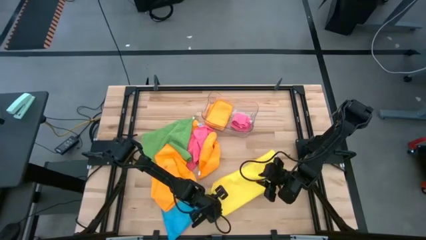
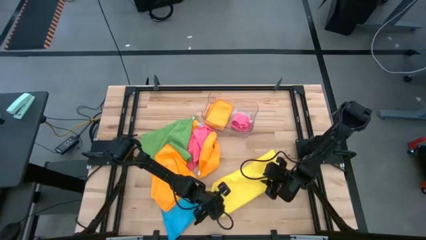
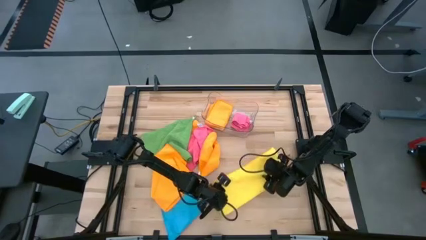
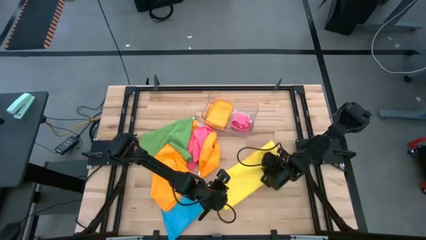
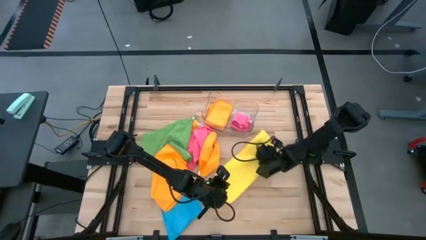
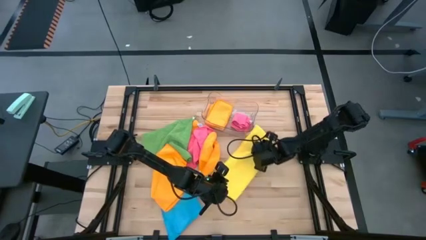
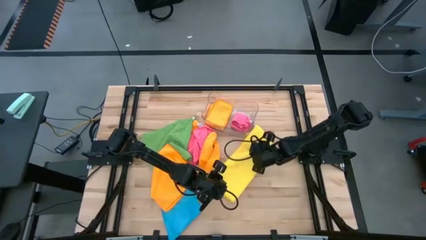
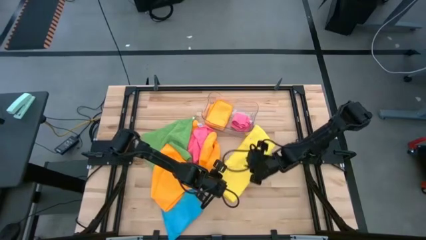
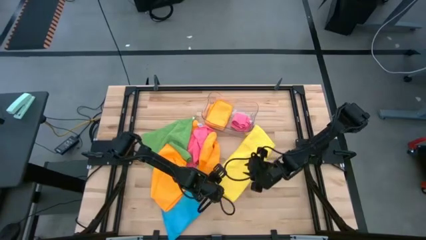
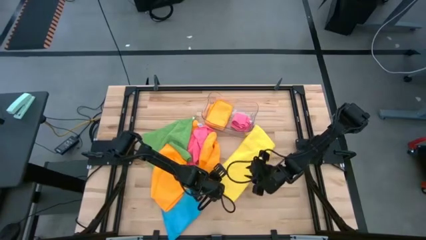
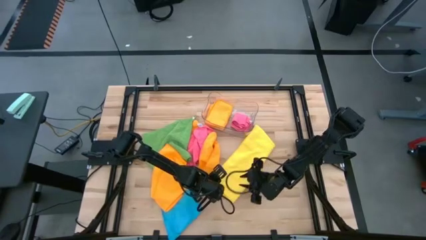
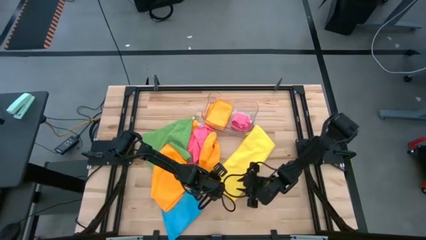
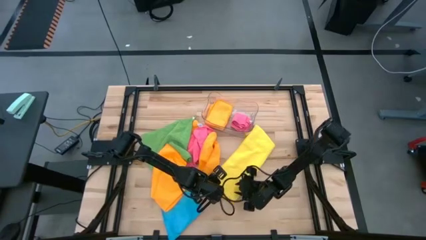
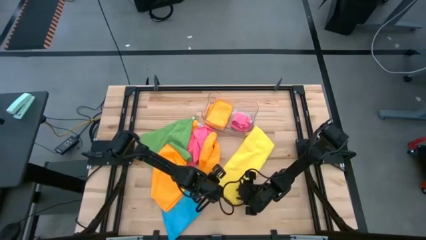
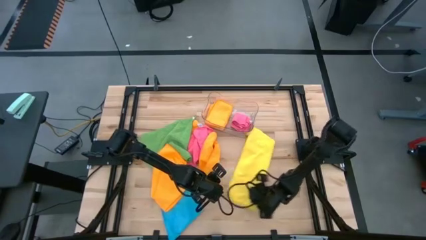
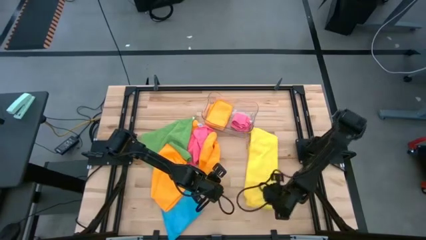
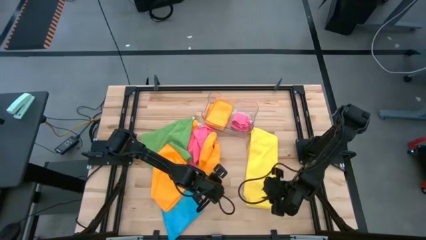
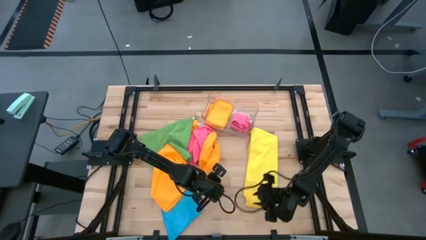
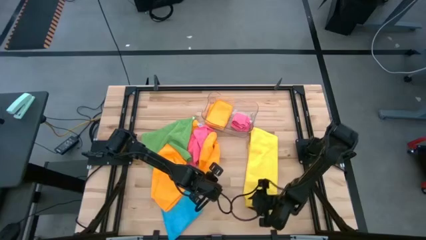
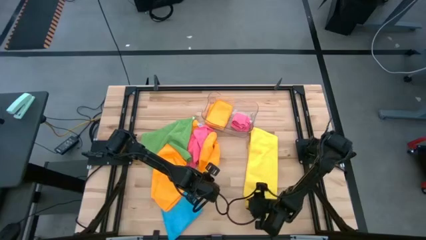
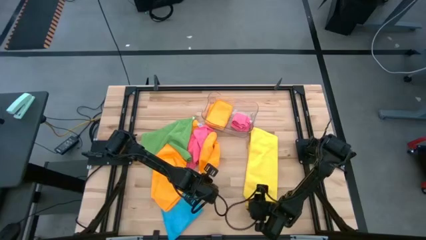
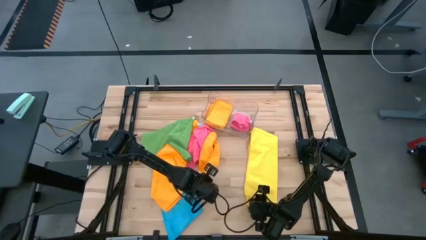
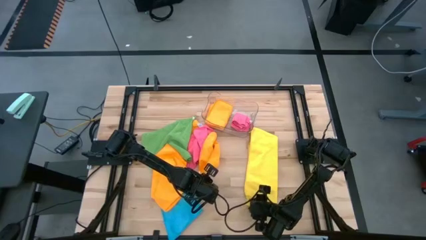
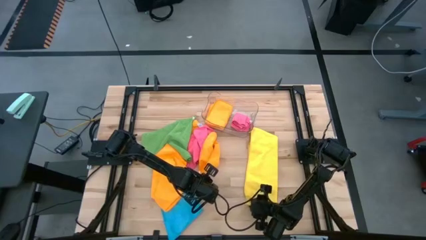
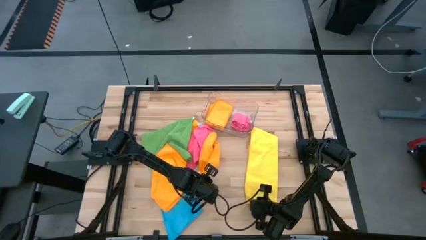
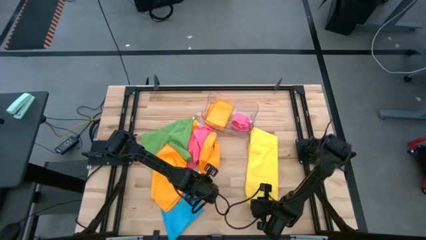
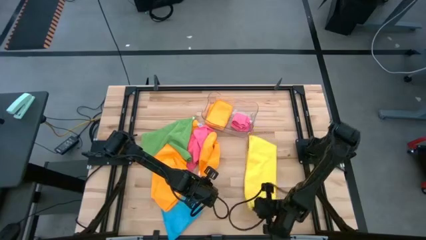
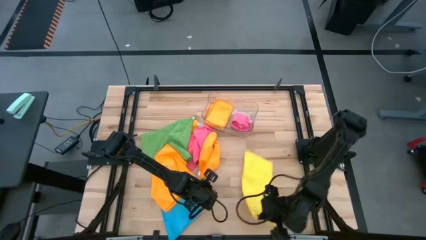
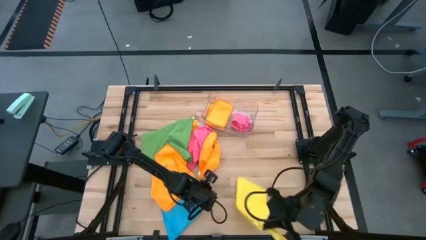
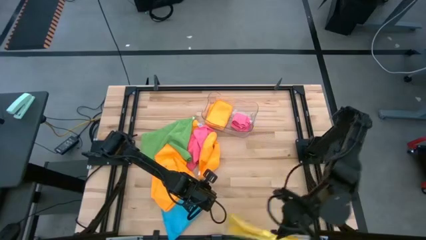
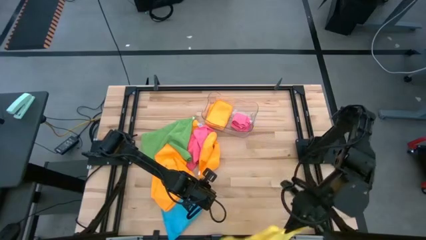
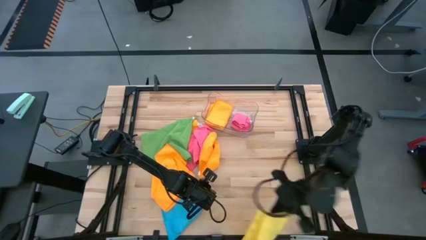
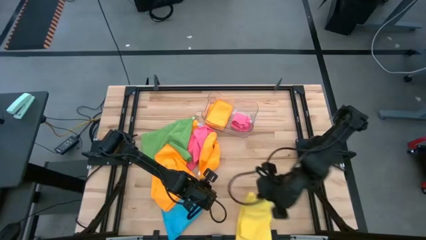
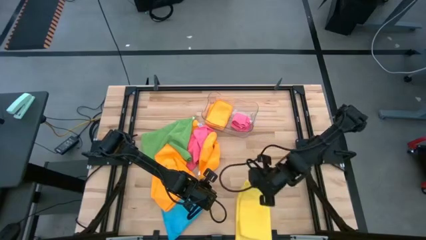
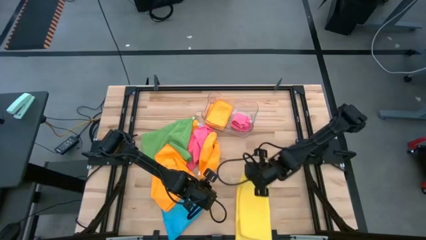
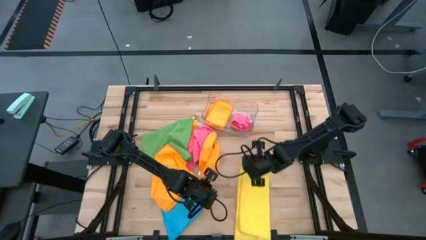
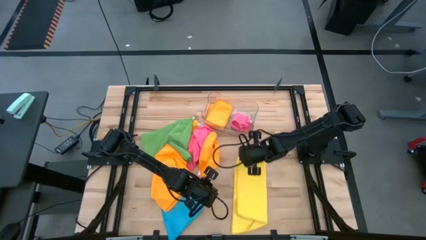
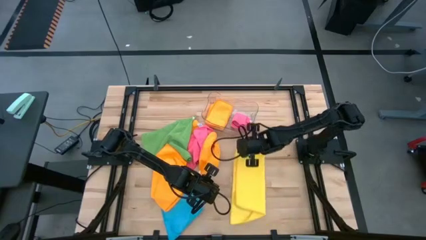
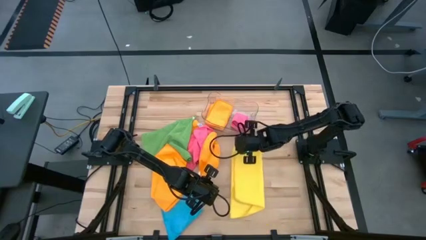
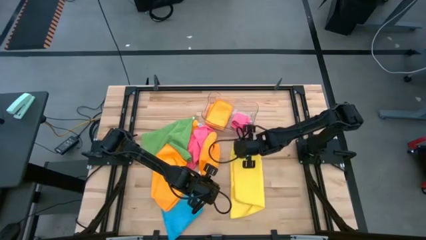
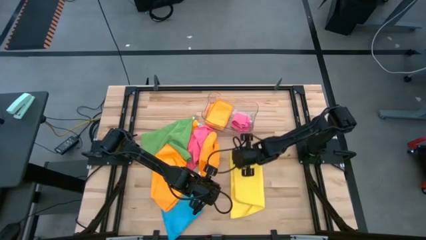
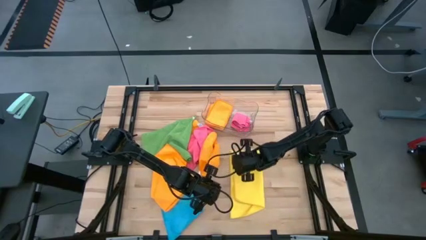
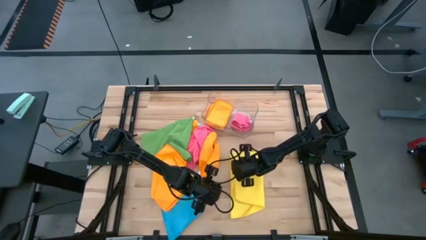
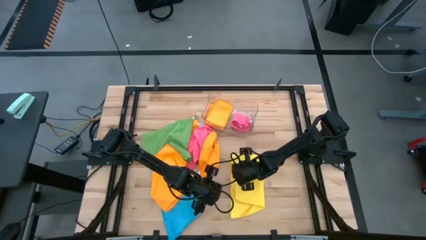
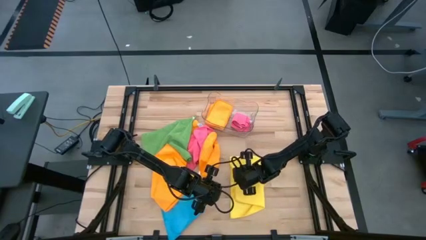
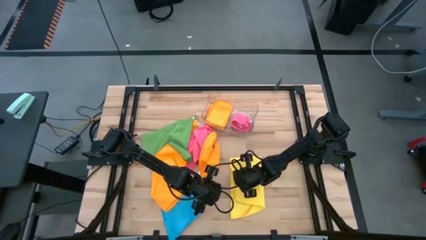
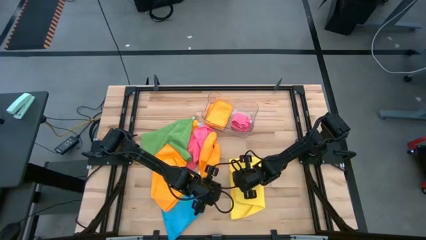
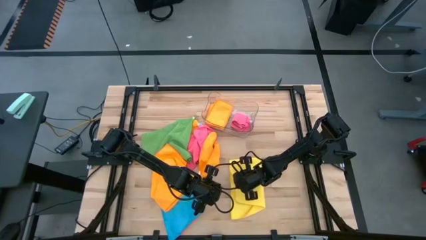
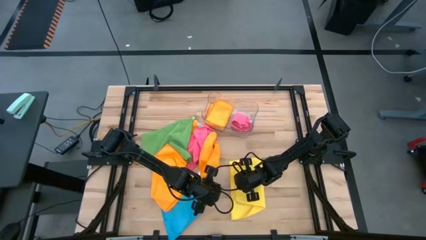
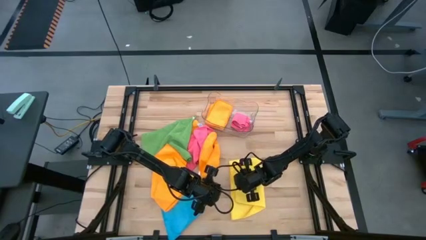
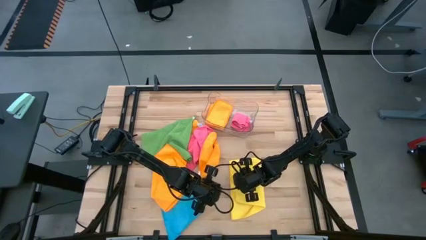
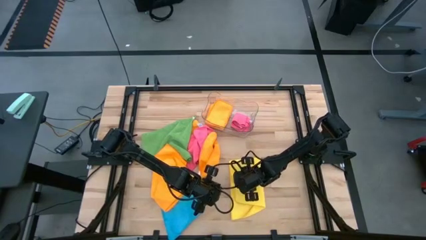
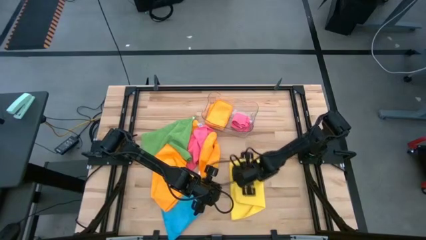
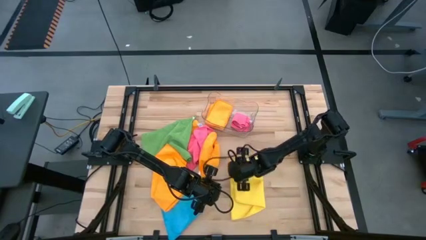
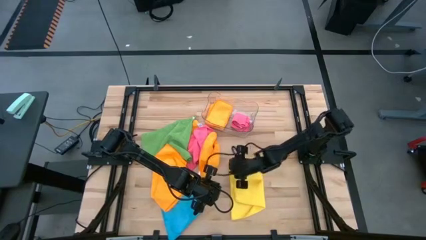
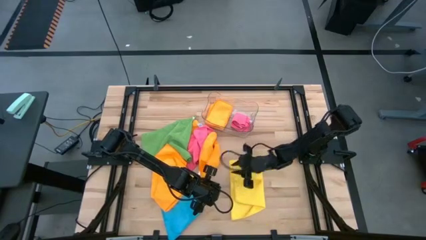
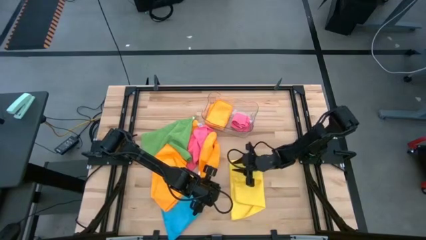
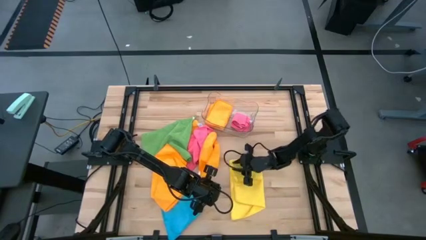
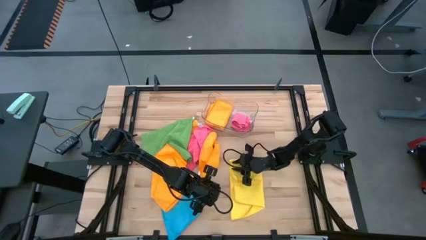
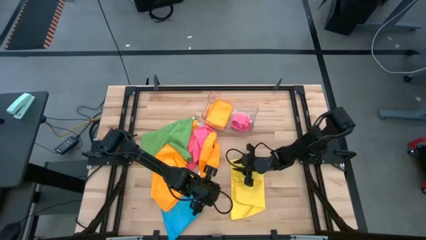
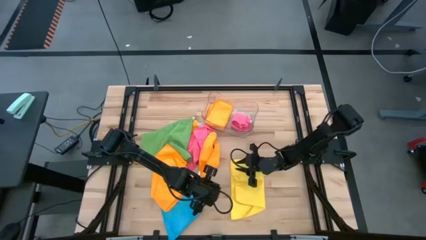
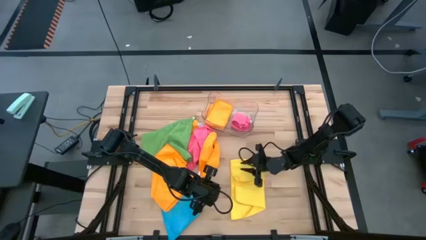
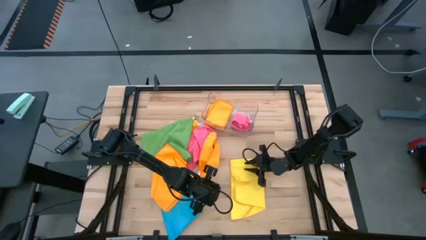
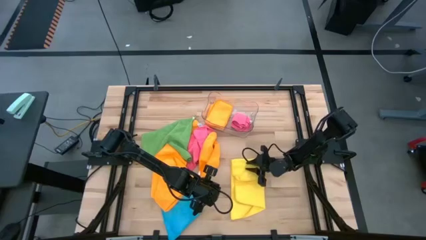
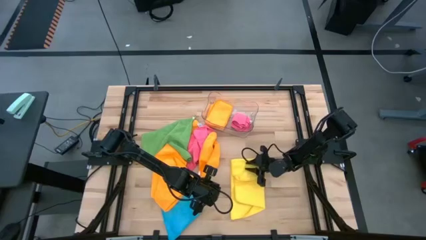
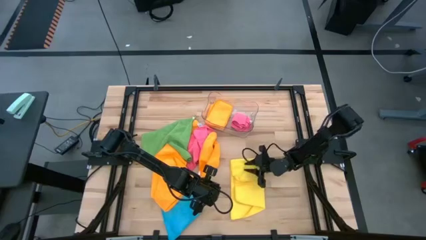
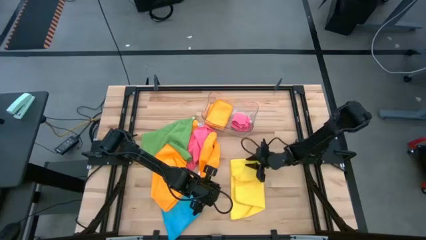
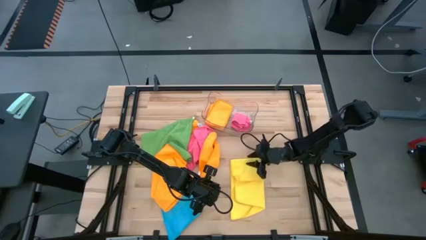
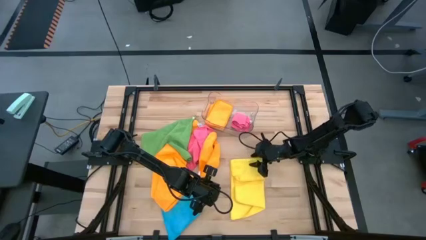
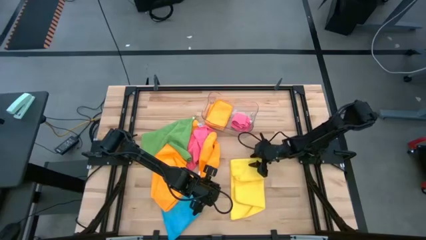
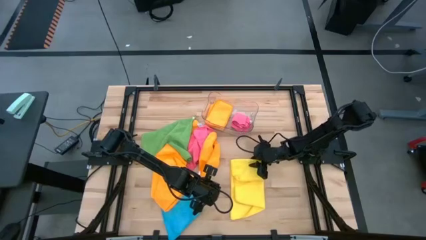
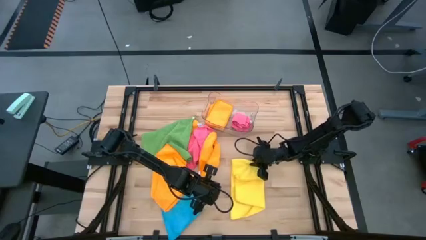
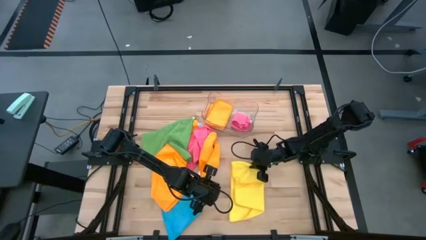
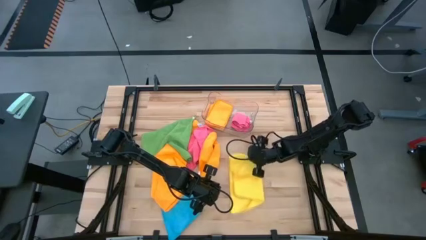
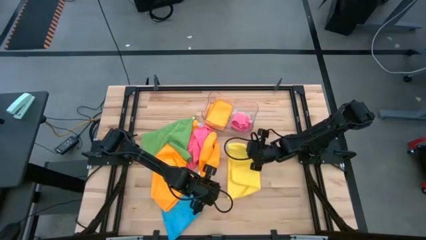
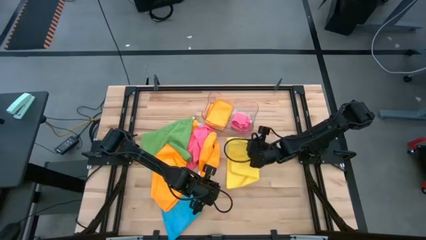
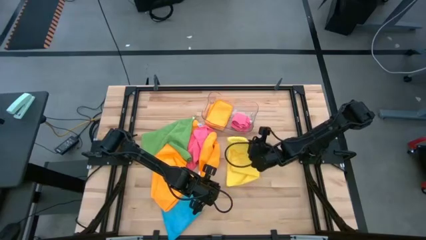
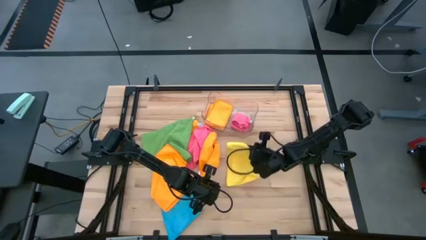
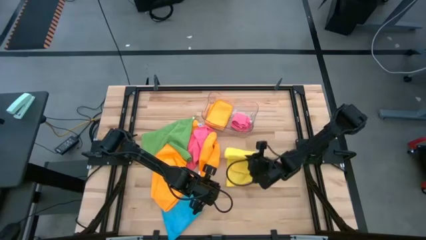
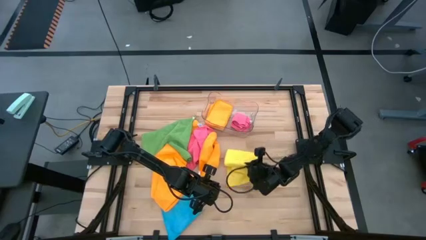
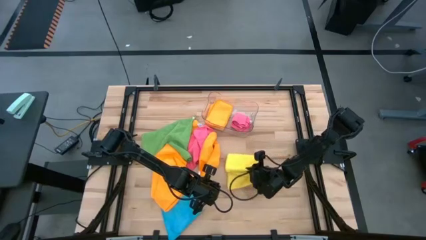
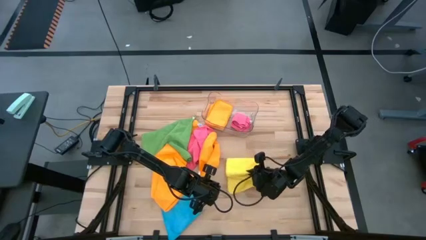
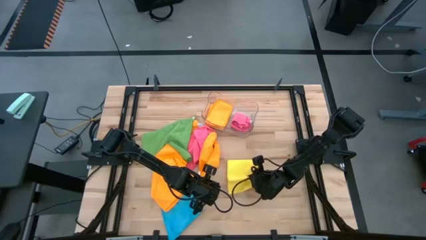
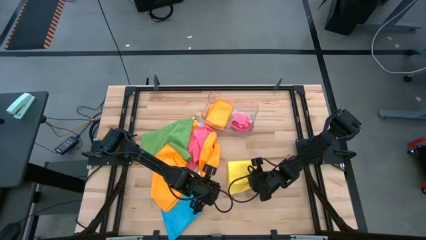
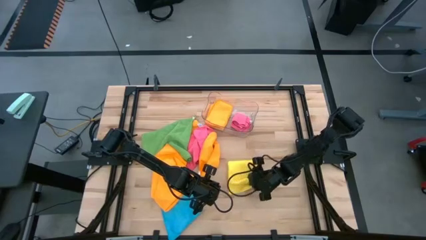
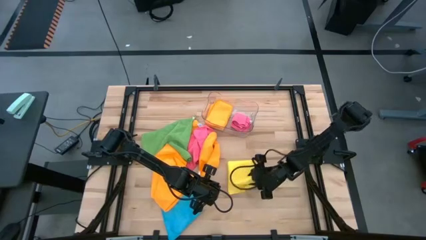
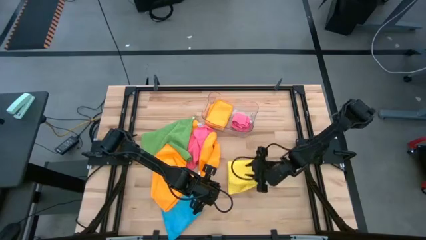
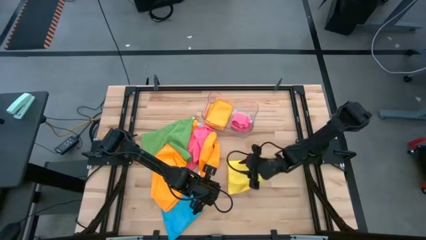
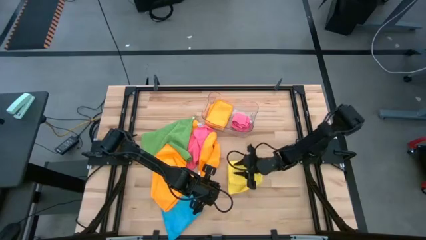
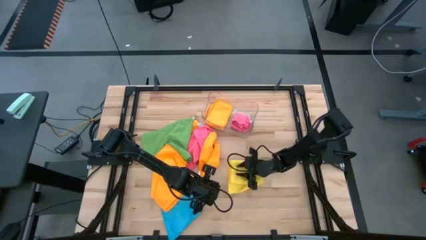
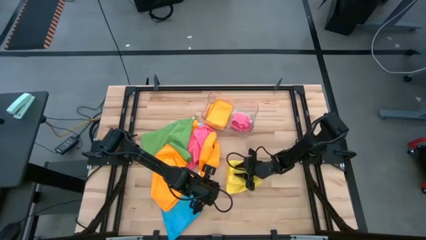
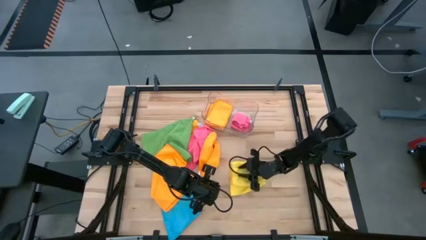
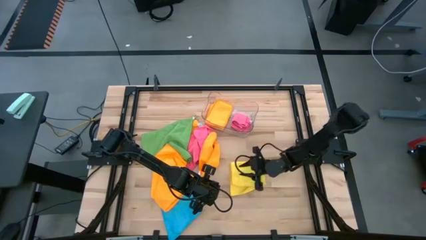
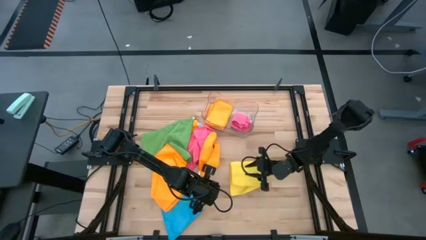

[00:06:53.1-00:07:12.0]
Task: Fold microfiber towels
Fold the yellow microfiber cloth
